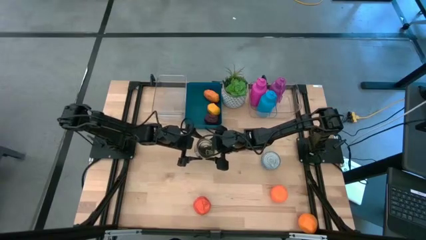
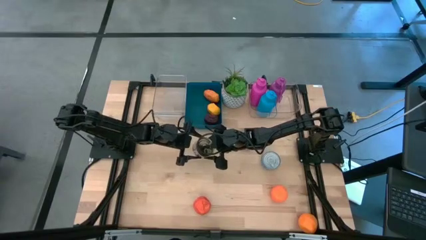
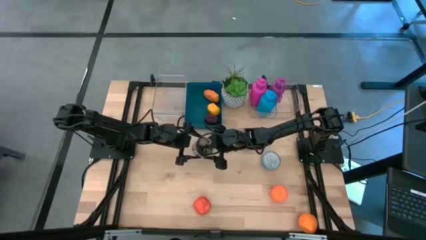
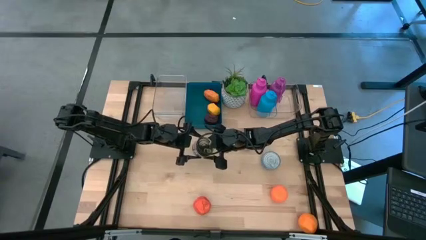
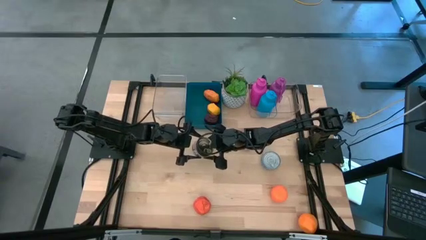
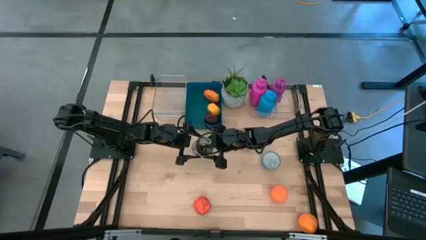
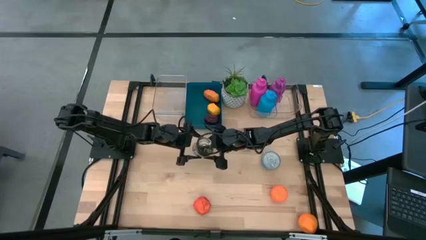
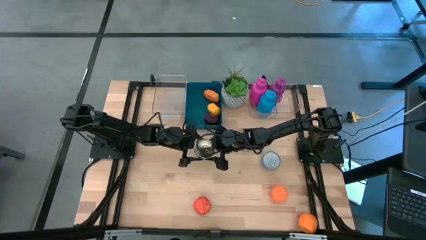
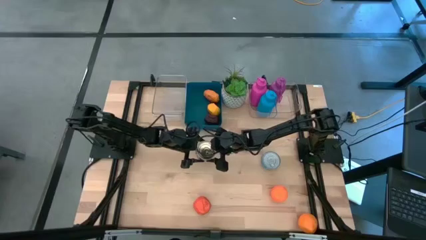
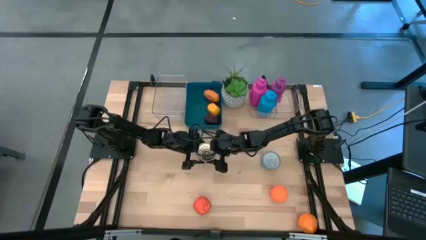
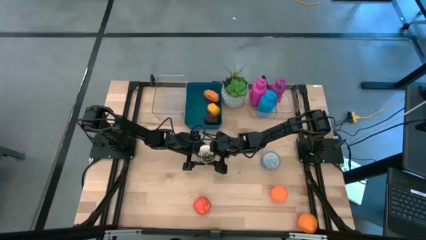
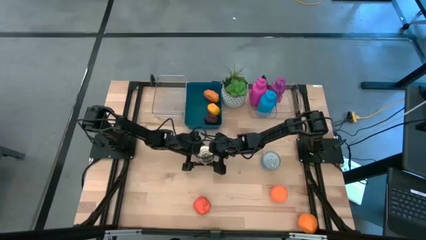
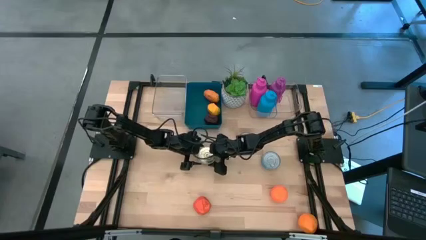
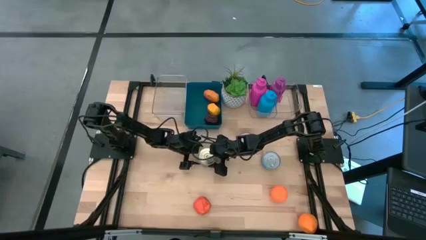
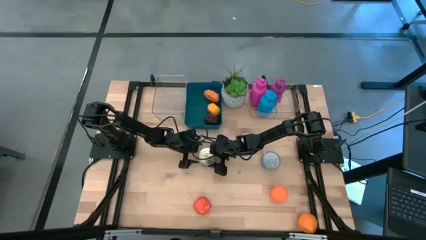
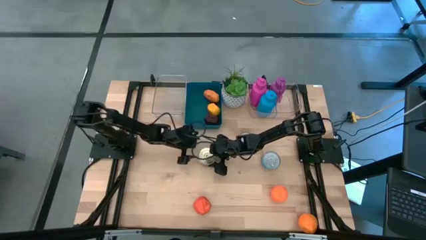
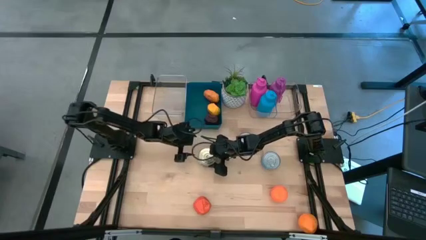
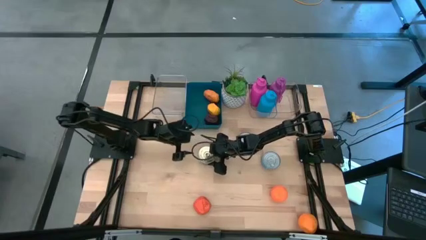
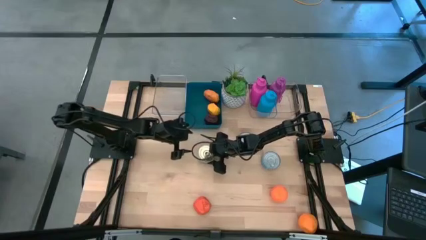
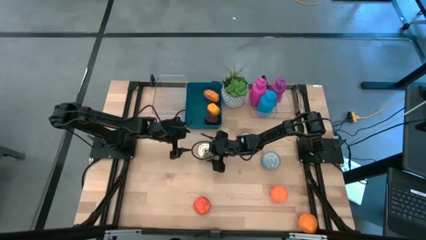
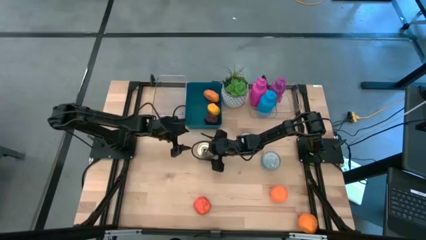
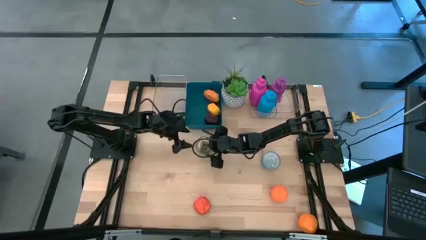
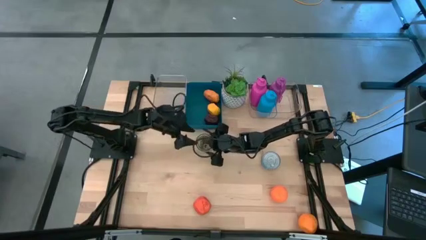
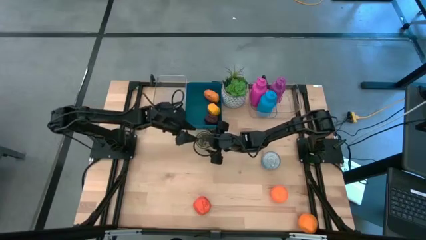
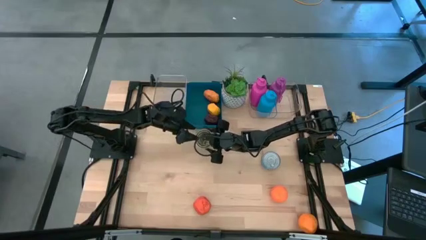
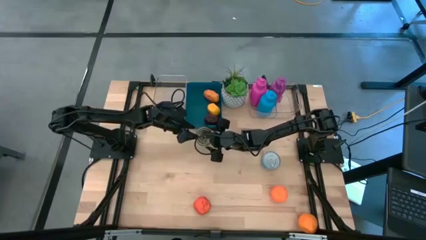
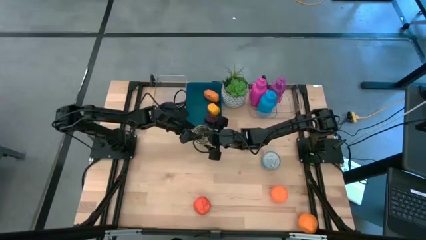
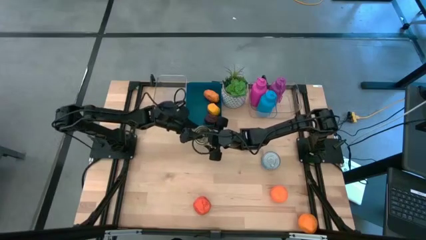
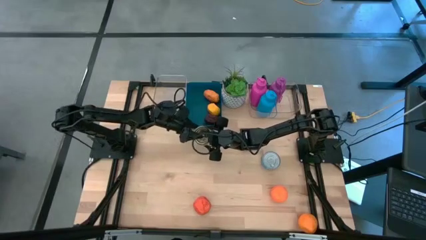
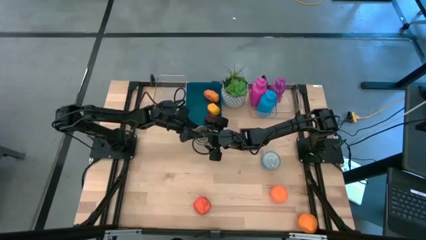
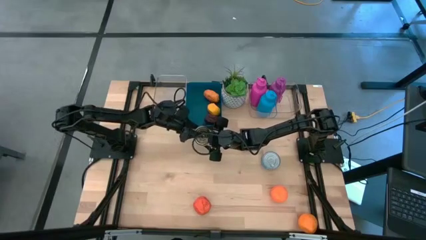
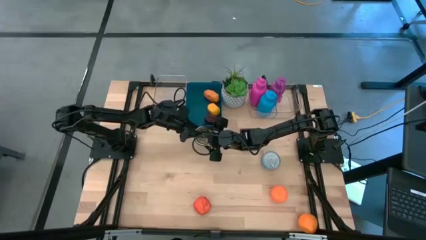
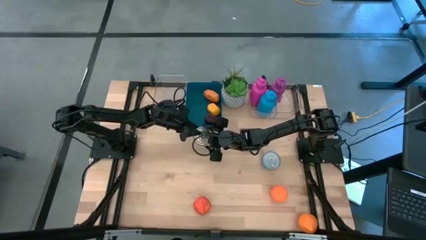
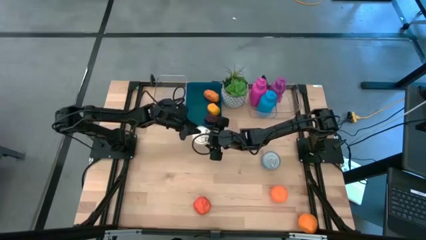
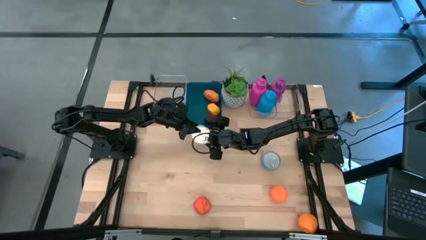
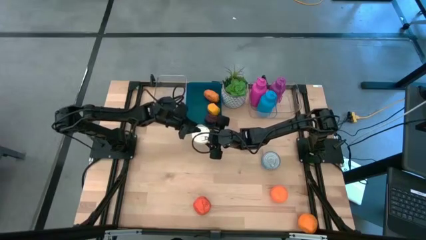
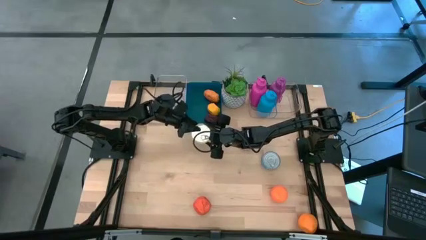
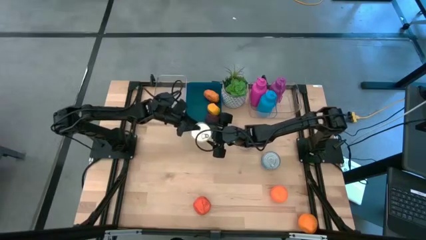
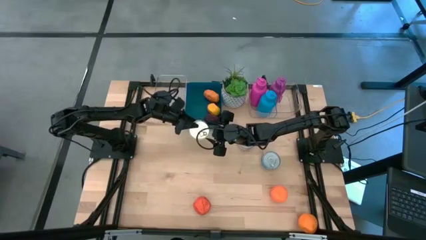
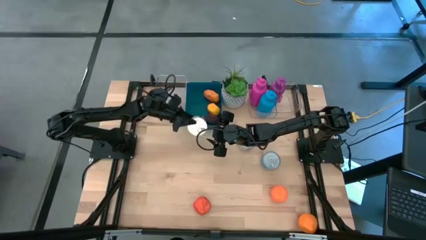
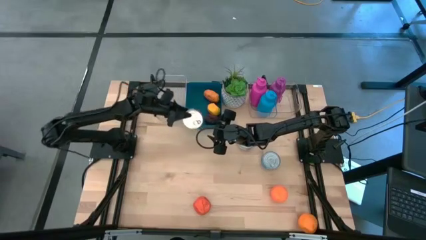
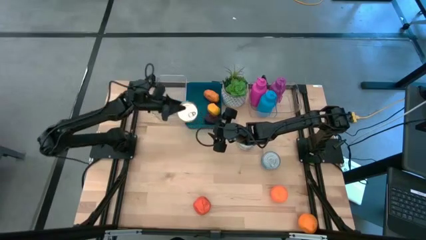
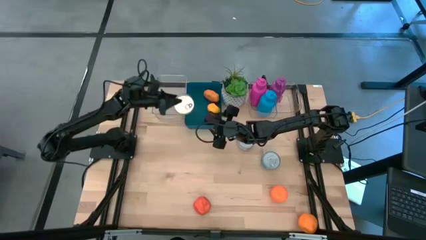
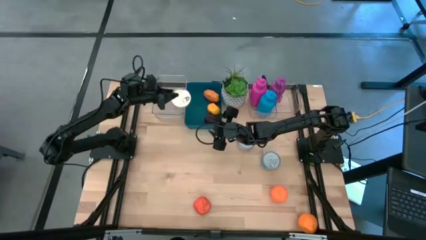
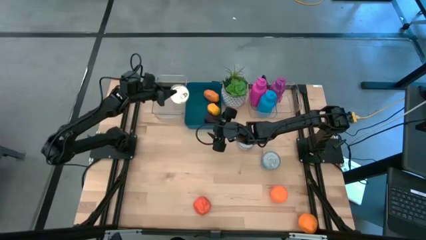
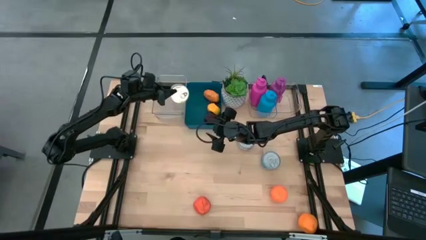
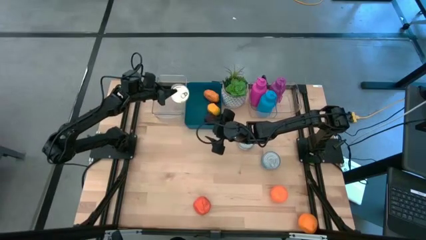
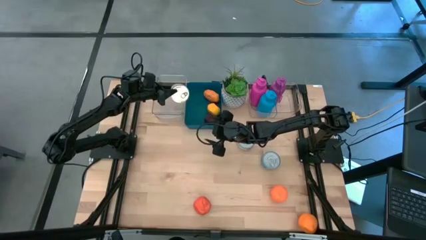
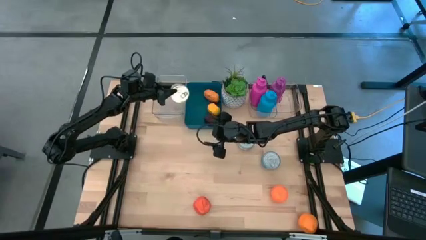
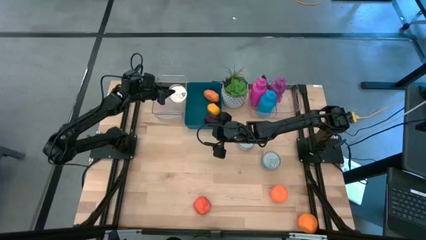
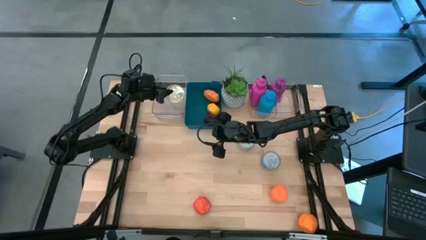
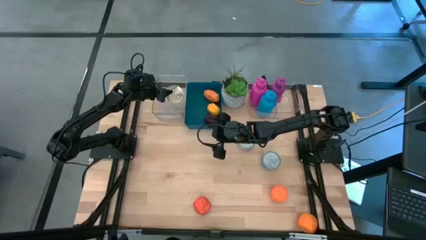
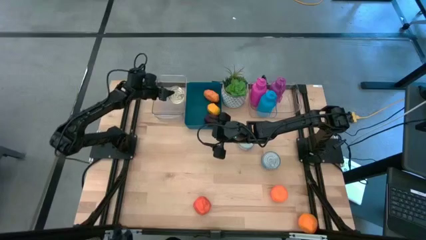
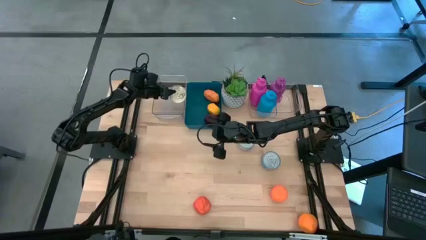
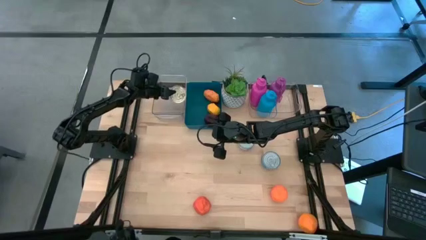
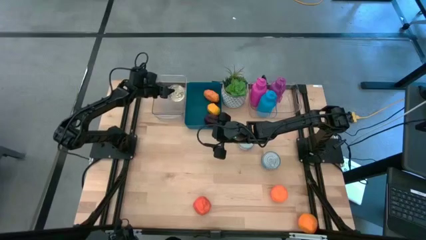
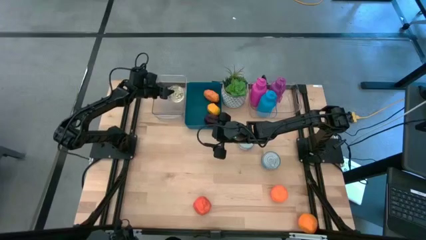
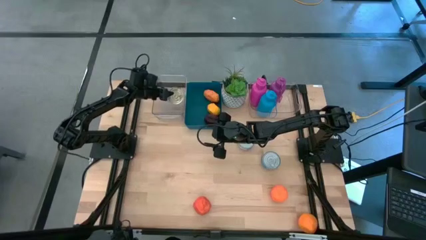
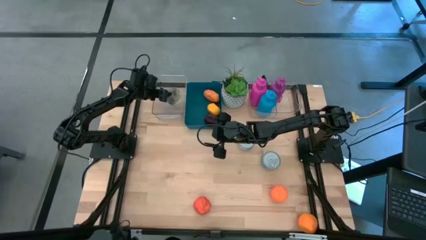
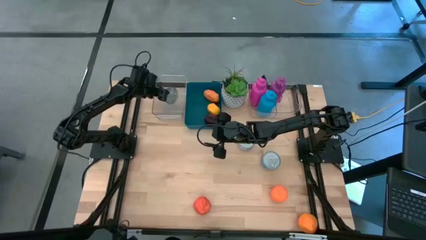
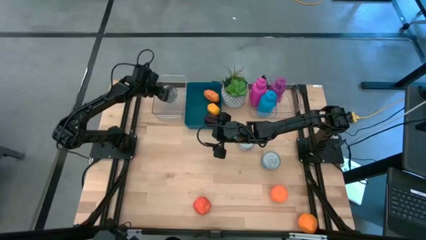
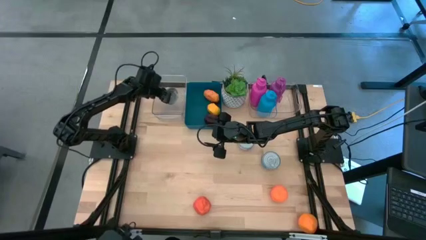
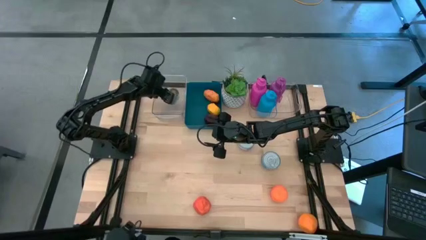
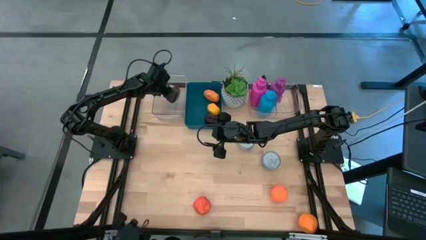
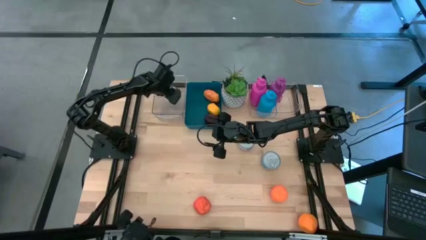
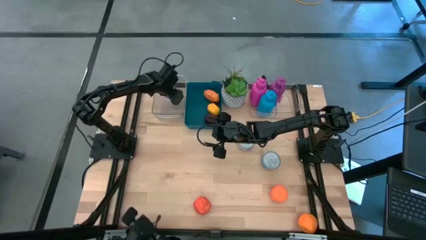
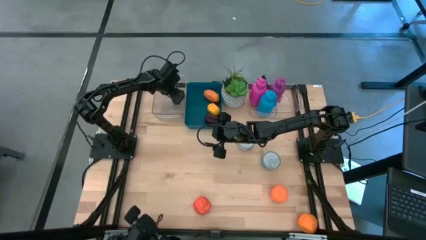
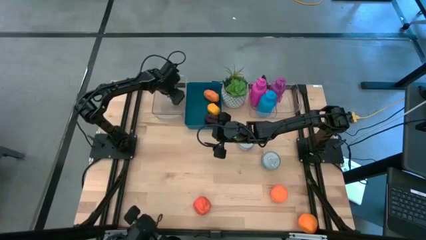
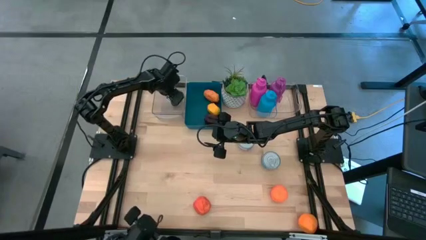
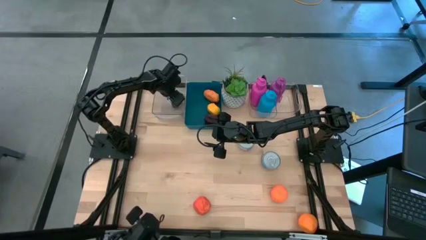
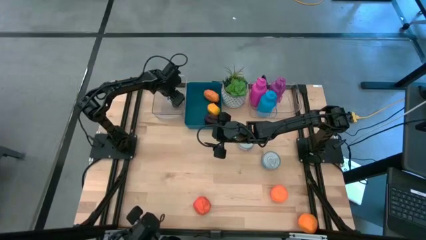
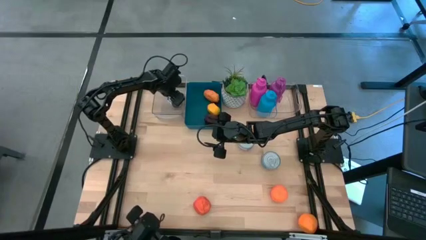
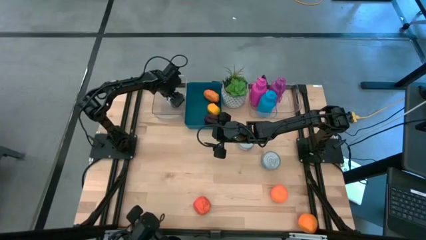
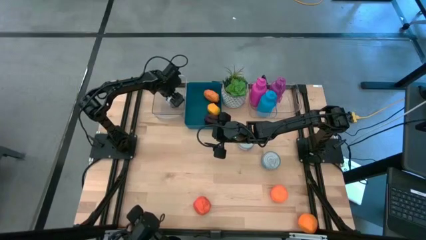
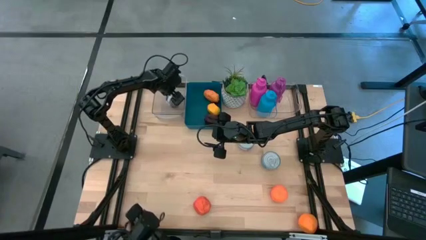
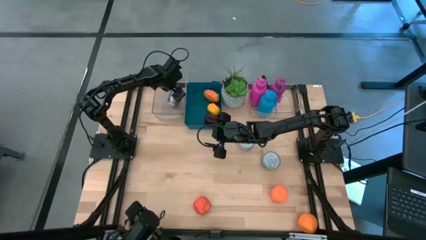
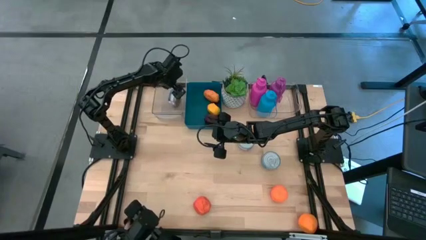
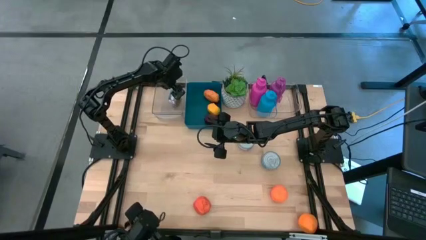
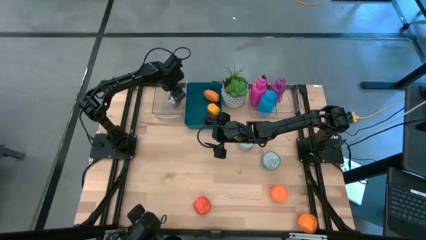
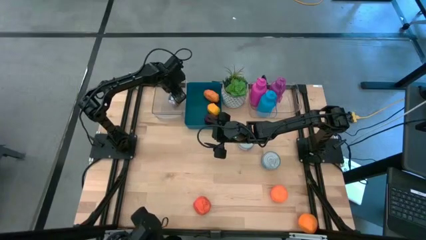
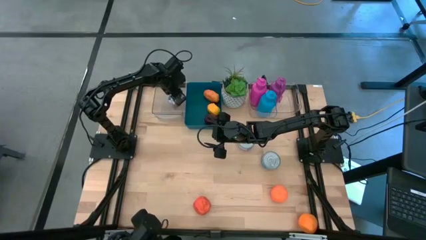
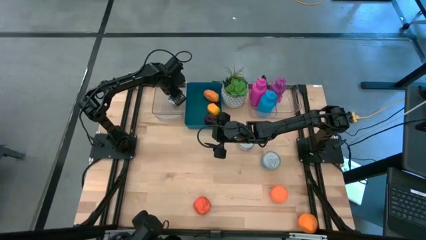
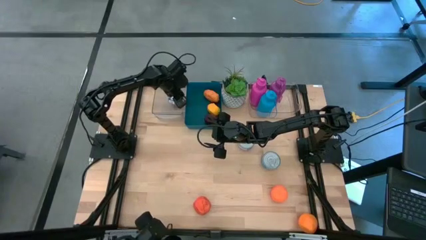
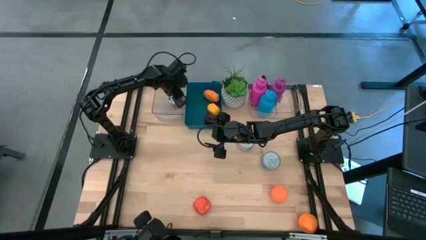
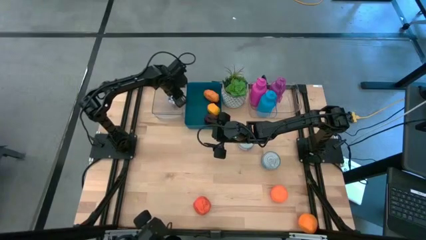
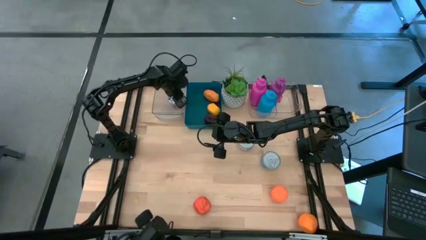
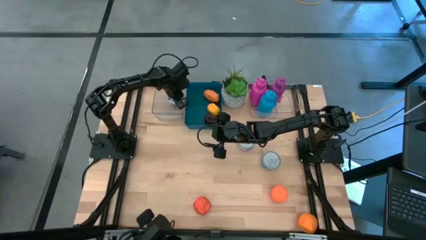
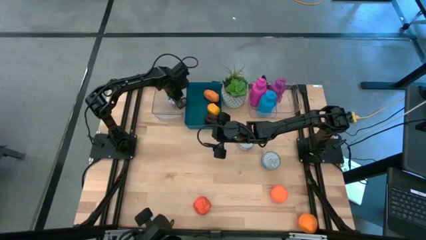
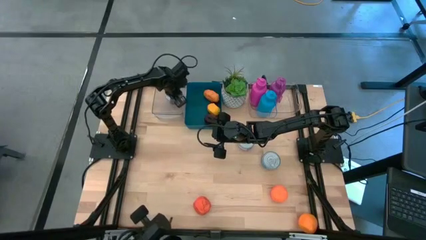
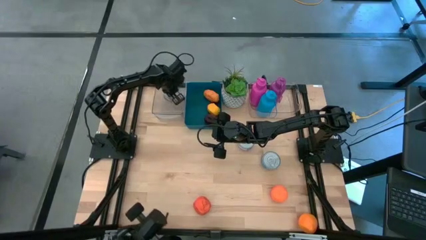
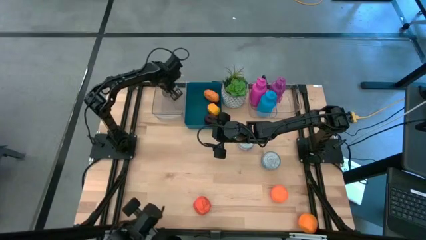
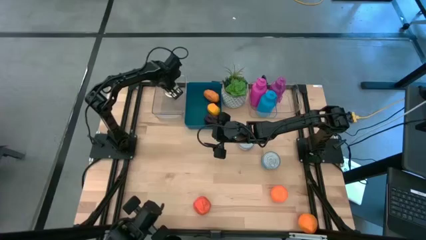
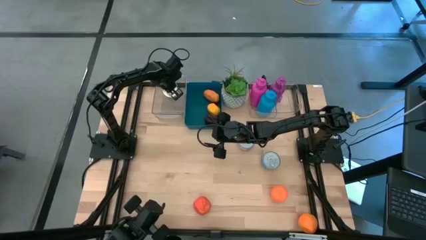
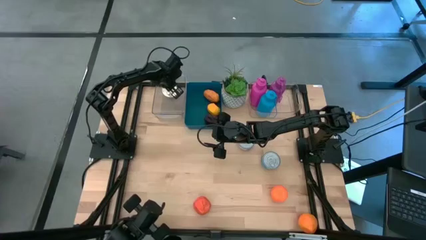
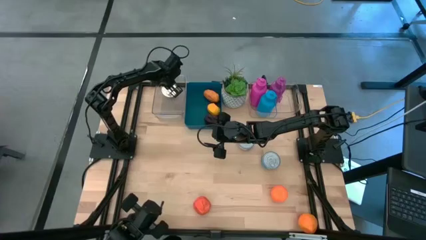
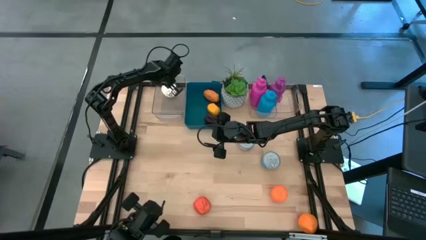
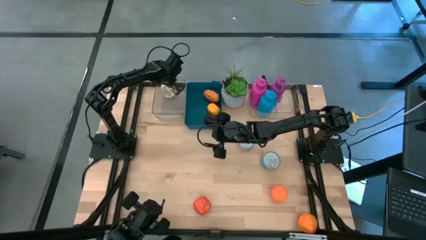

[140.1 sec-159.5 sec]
Task: Pick & Place Food Item
Put the blue tuna can into the left transparent bin
